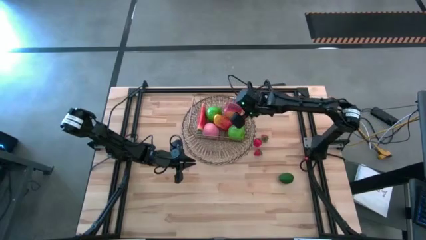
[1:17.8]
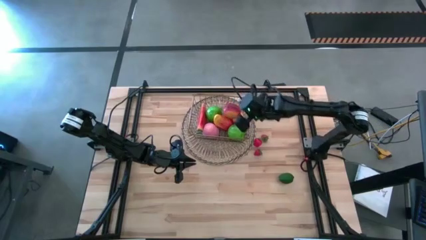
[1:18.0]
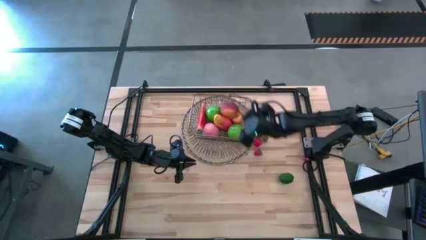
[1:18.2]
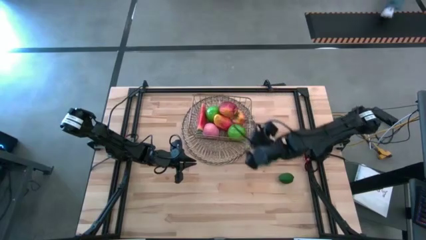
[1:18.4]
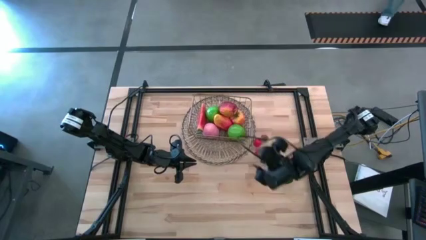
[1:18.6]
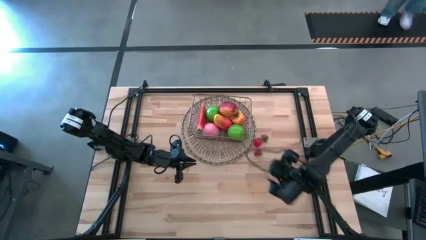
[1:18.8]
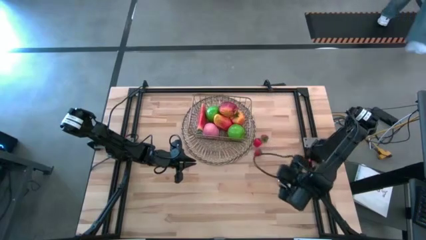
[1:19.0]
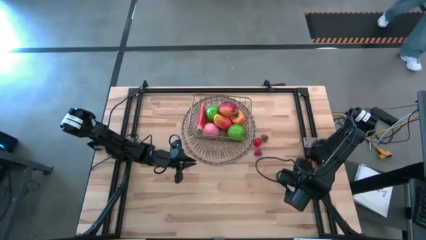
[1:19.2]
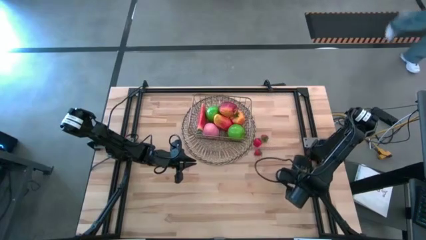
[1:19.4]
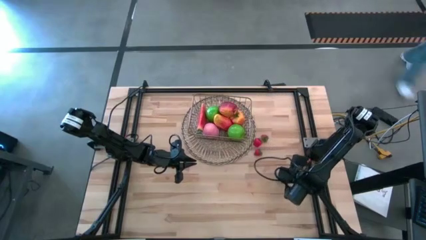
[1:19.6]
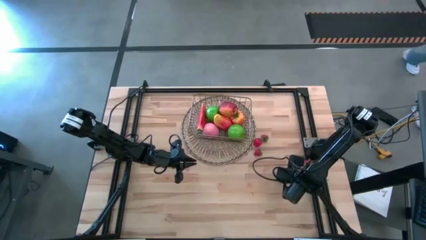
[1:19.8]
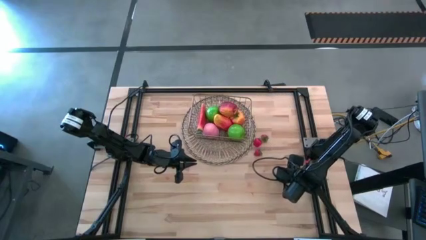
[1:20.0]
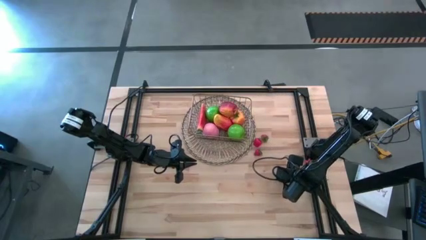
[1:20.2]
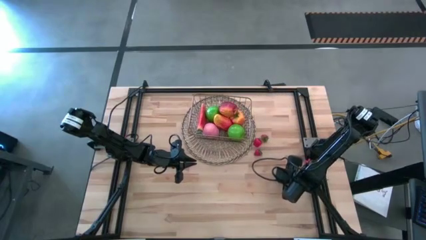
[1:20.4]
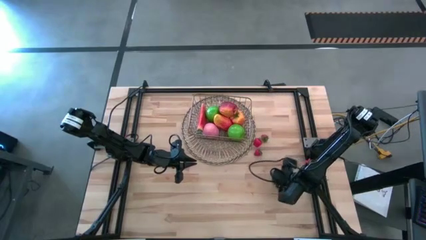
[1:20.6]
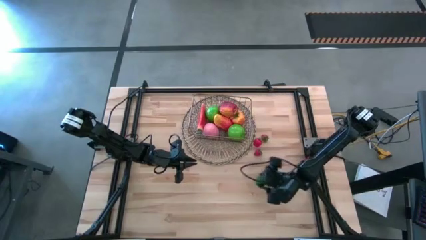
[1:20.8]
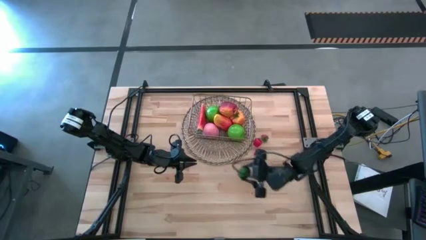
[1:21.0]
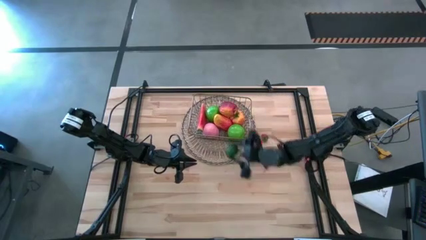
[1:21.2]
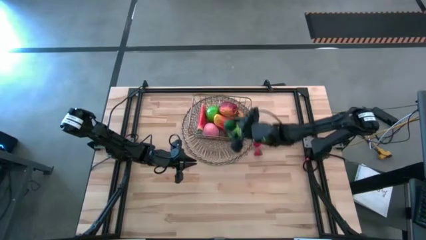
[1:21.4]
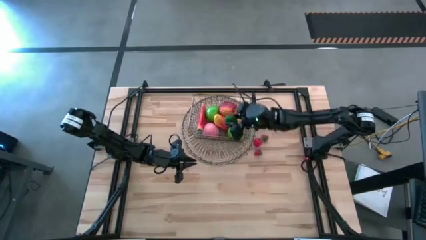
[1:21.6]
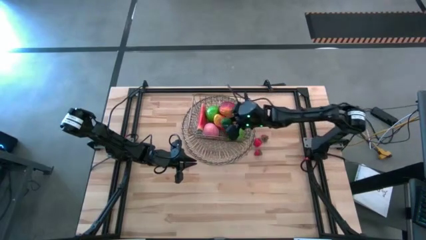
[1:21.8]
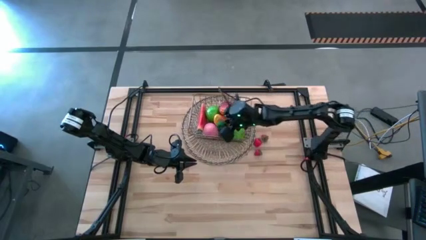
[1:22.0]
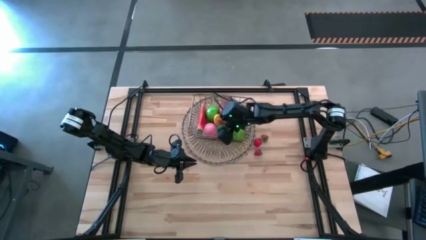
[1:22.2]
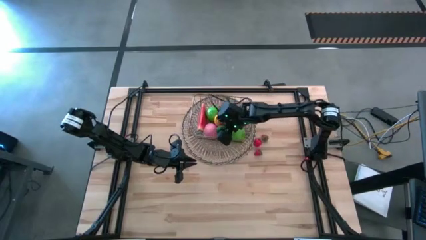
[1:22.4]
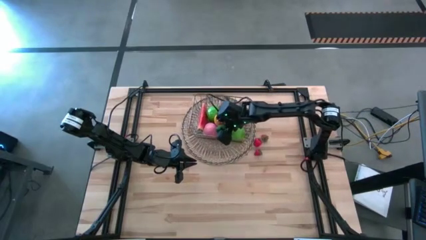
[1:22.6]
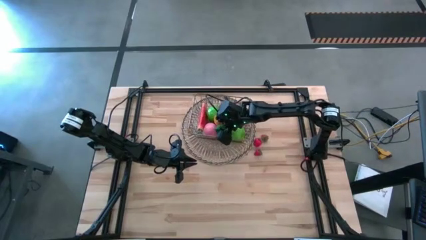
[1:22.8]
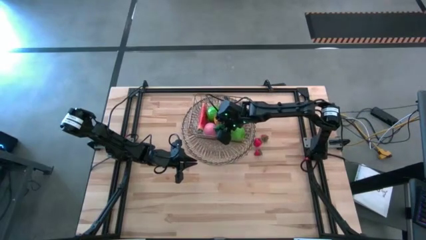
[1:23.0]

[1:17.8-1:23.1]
Task: Build produce basket
Put the green lime into the gold wire basket

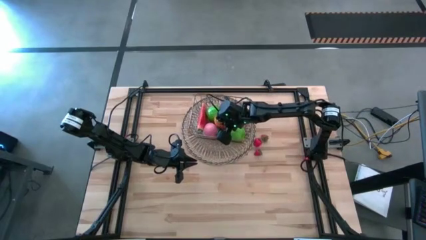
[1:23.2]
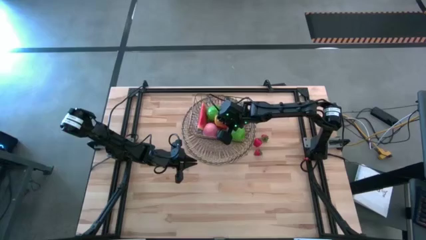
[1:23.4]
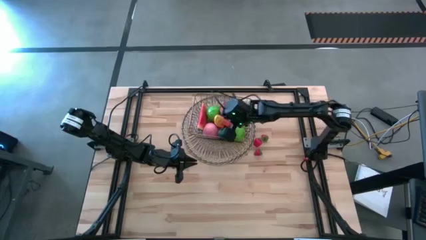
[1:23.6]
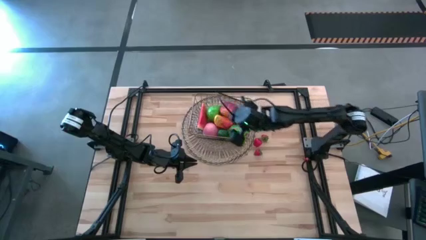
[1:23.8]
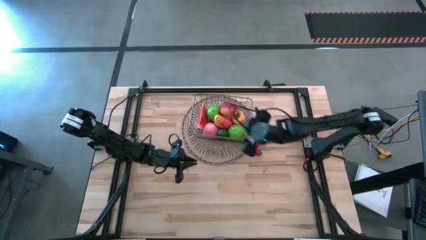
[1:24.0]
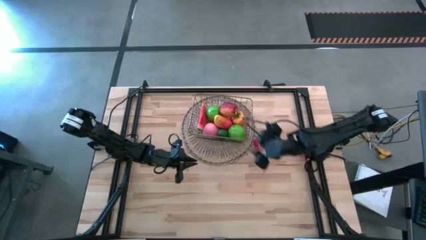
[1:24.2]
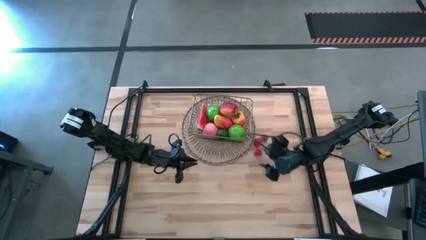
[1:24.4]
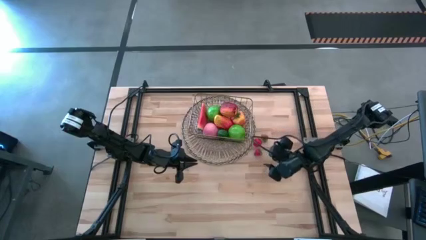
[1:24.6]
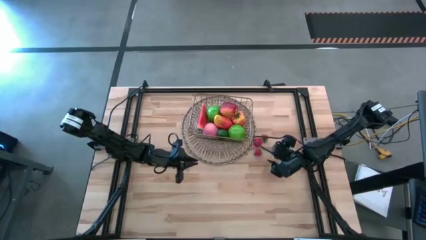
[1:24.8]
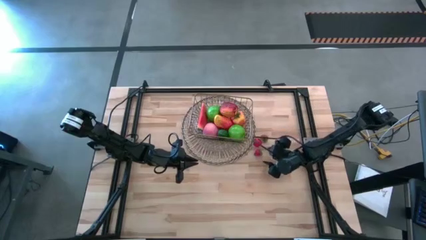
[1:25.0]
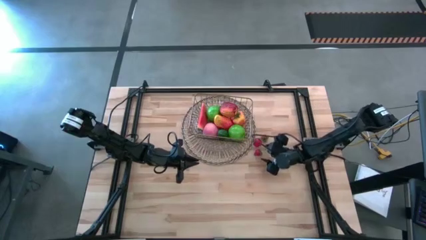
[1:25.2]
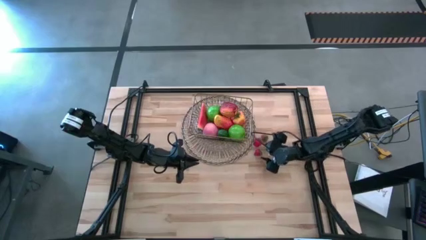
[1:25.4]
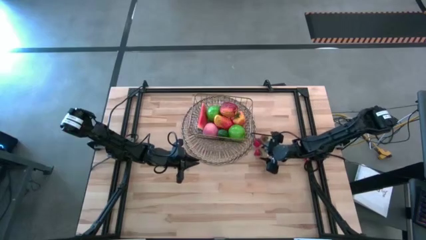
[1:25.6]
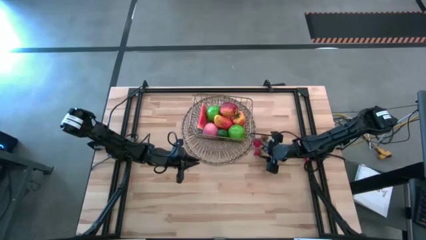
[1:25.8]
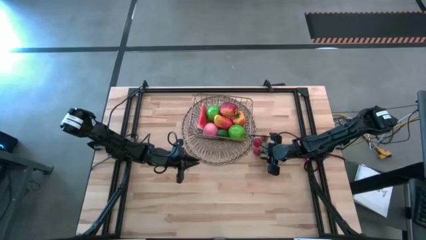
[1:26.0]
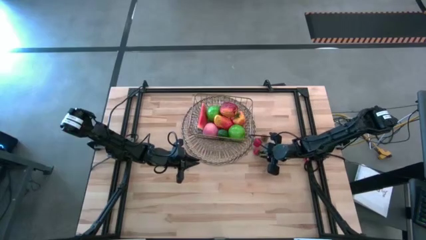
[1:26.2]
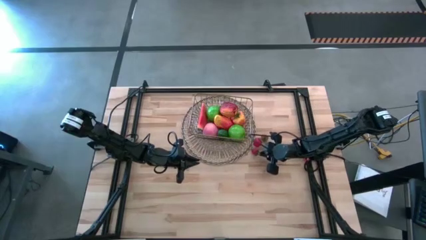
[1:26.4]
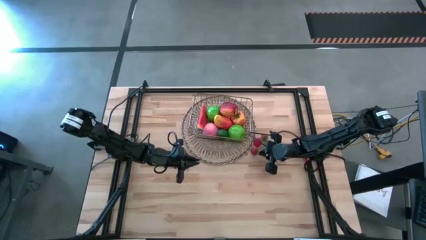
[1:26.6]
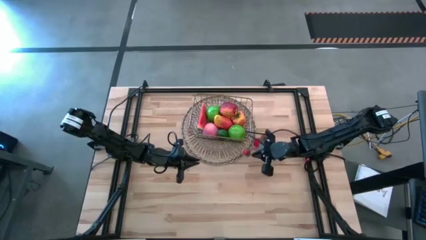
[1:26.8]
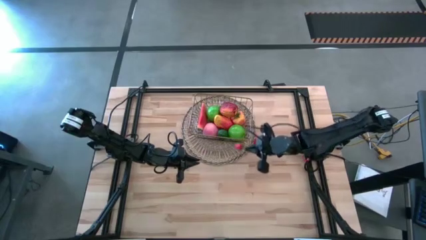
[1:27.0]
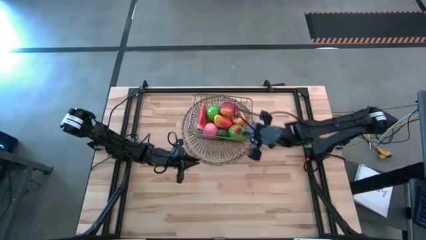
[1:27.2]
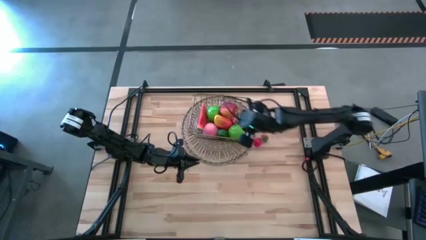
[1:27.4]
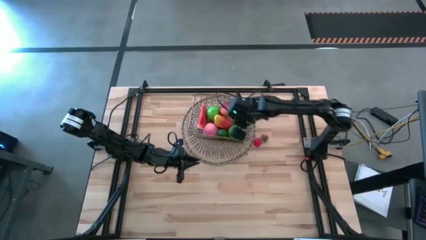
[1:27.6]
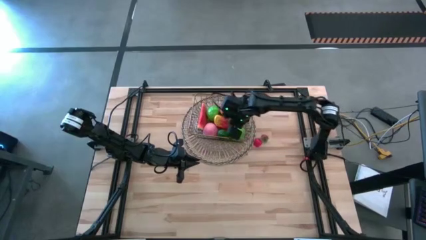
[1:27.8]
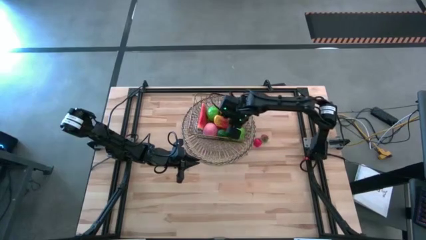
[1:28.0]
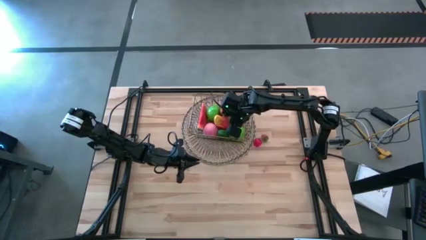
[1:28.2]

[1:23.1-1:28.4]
Put the bottom red strawberry into the gold wire basket

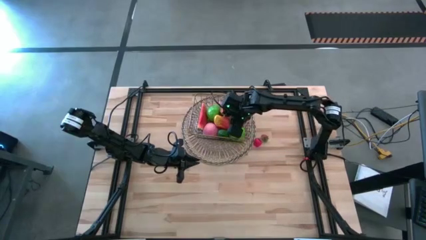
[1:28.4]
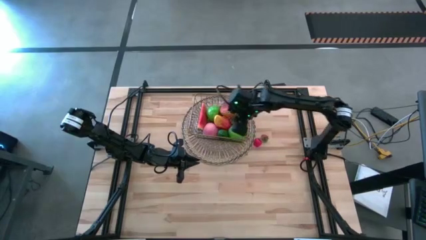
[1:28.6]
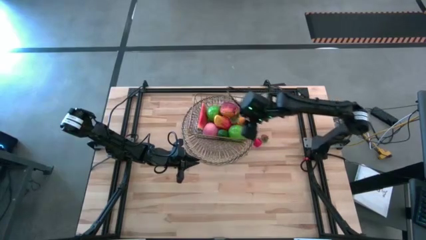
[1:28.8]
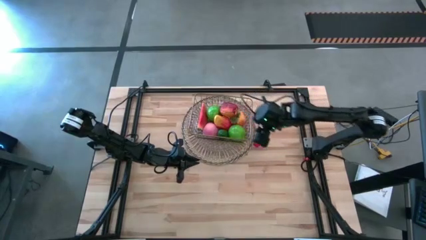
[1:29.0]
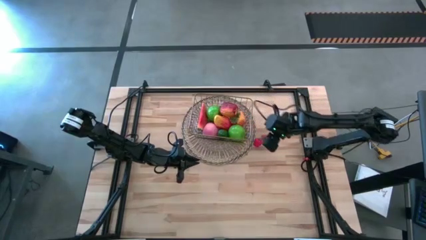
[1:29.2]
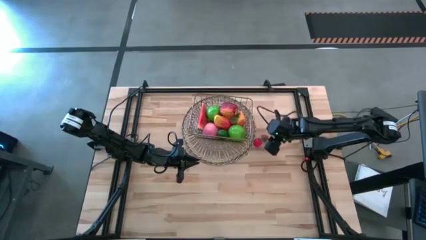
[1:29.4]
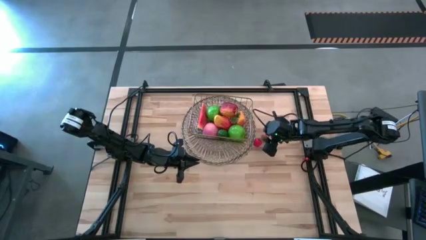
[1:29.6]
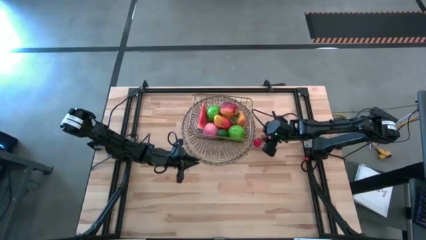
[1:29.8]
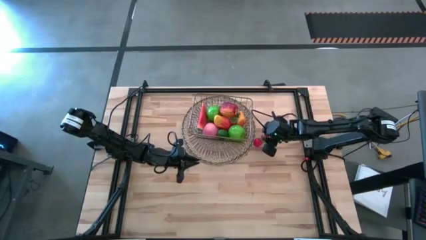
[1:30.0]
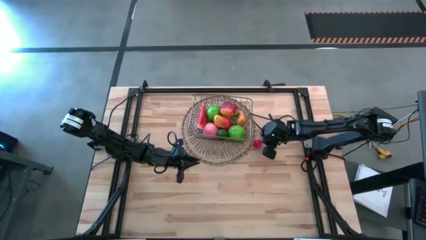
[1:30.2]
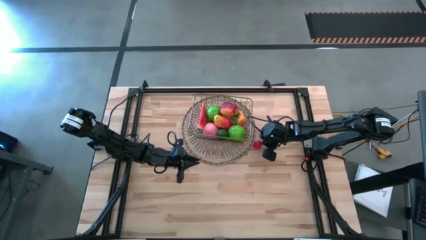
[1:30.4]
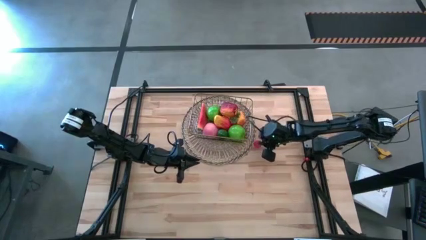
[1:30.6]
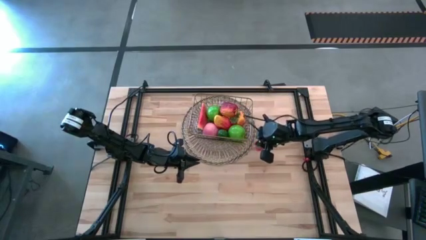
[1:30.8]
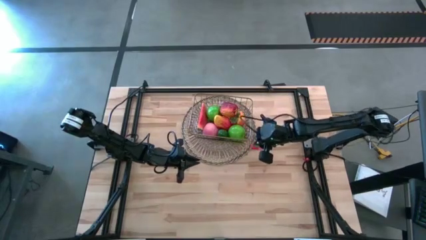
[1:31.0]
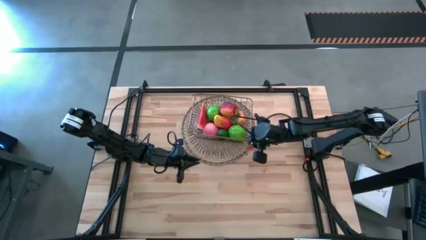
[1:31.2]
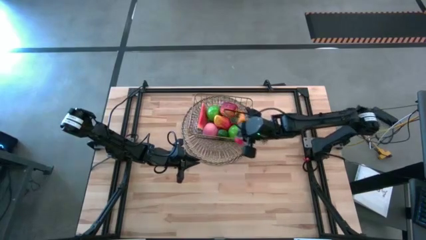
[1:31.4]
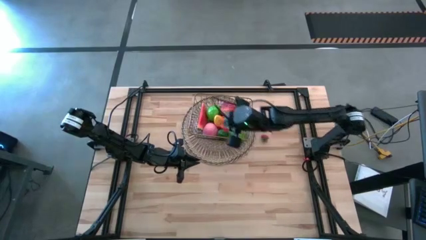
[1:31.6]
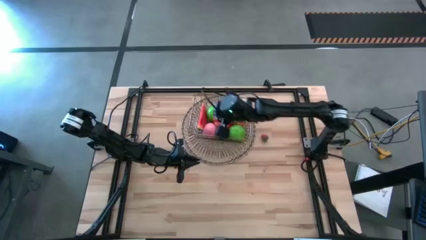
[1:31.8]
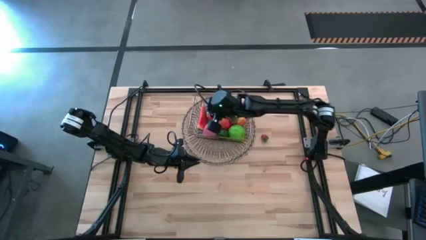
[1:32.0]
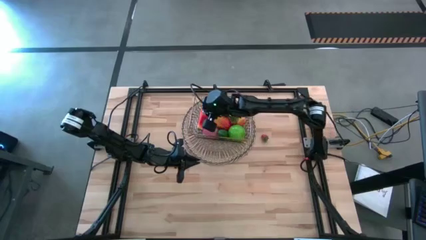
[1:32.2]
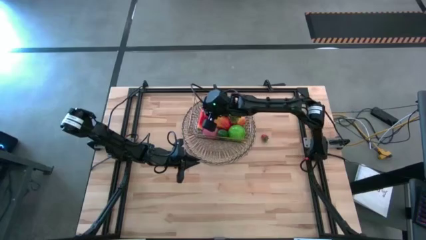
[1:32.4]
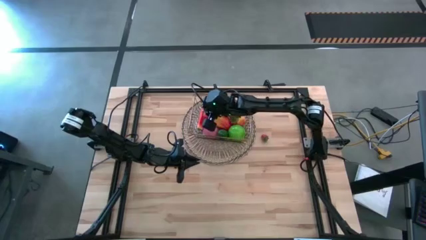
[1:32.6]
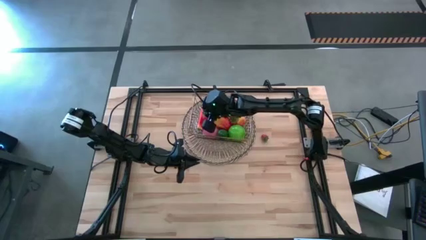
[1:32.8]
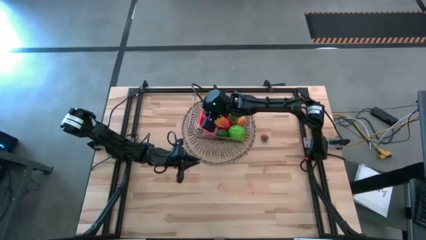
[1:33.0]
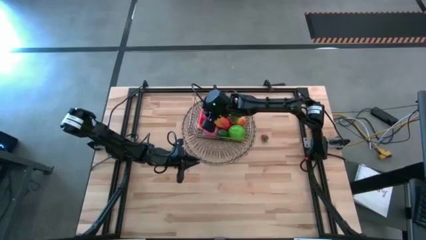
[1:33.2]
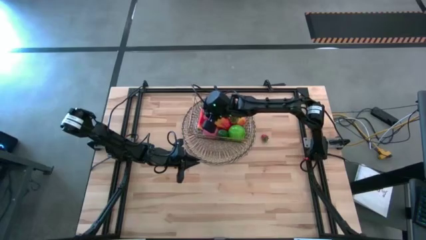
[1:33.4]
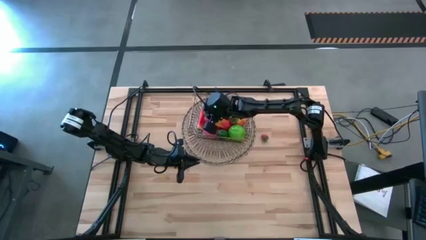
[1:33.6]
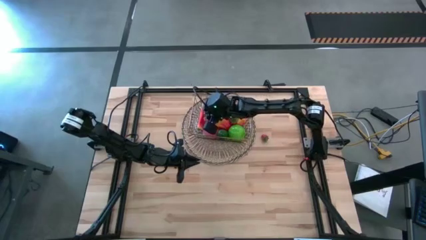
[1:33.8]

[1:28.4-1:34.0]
Put the bottom red strawberry into the gold wire basket

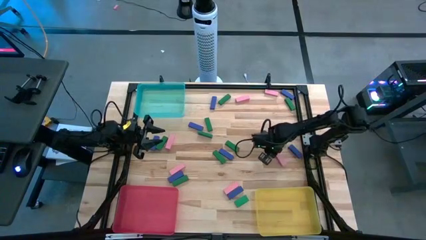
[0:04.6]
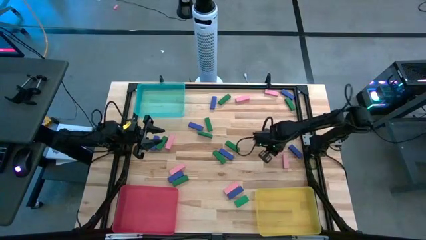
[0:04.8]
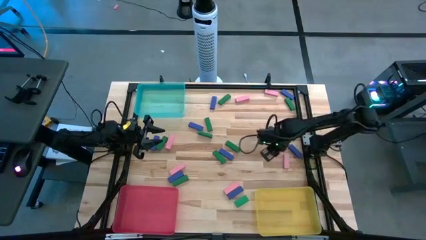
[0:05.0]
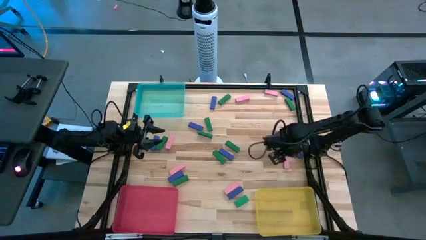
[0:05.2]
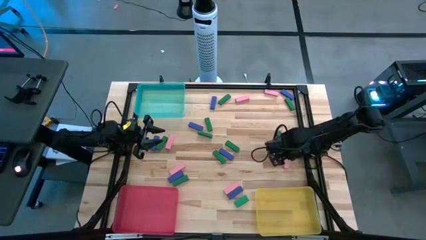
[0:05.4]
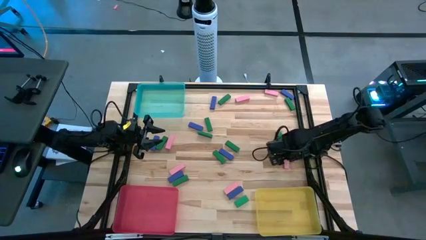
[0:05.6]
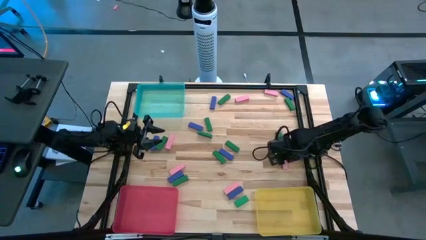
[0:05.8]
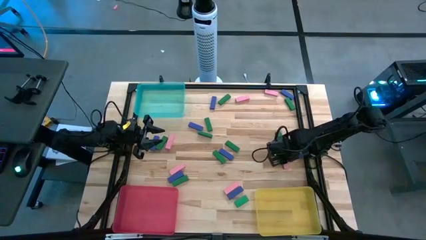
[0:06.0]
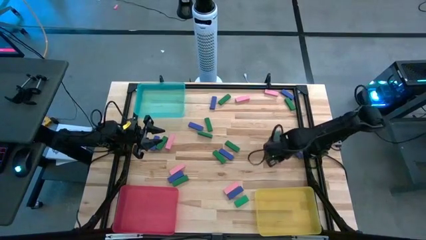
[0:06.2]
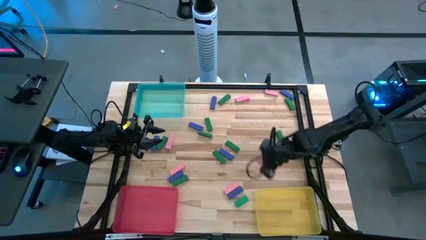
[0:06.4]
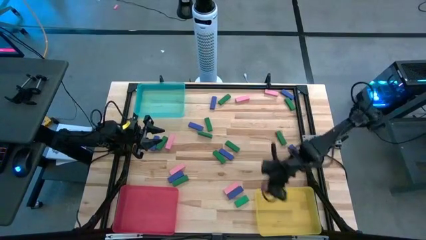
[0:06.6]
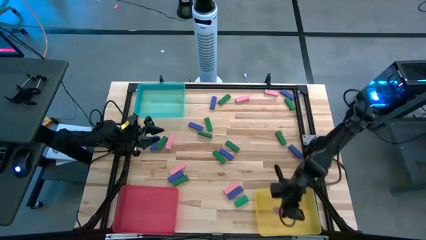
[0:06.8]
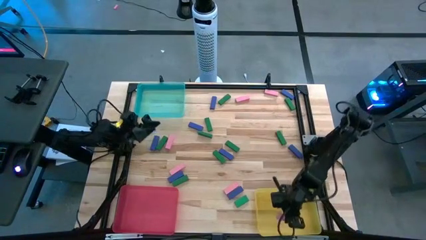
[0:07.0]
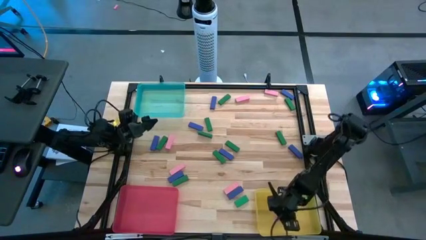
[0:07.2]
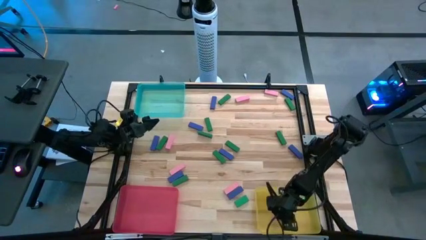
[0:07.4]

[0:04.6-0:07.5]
Task: Sort blocks
Put the pink block into the yellow bin
